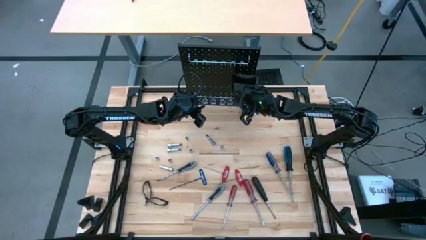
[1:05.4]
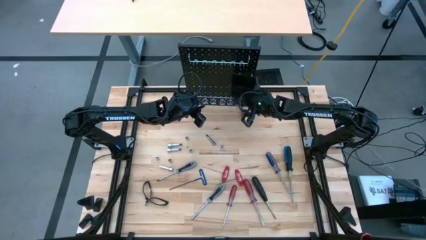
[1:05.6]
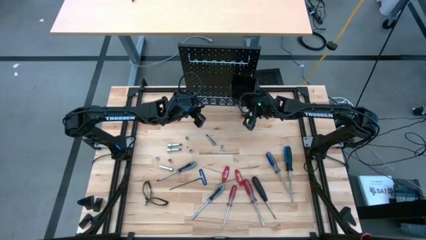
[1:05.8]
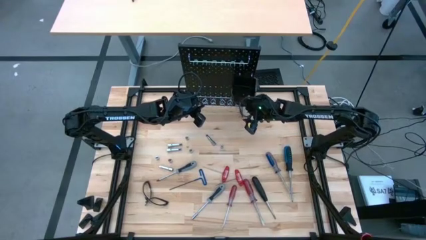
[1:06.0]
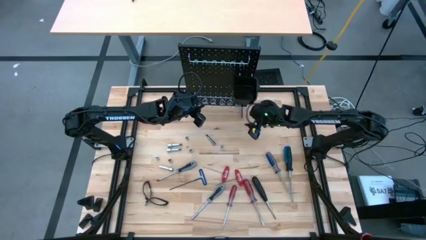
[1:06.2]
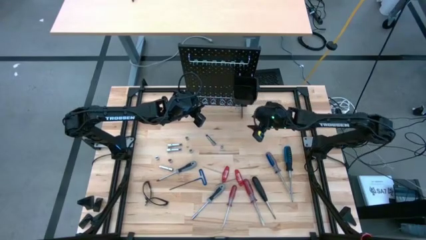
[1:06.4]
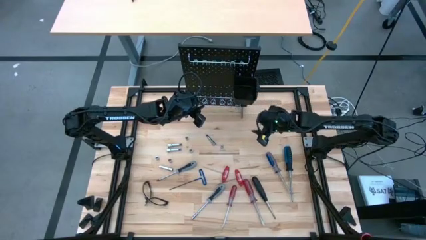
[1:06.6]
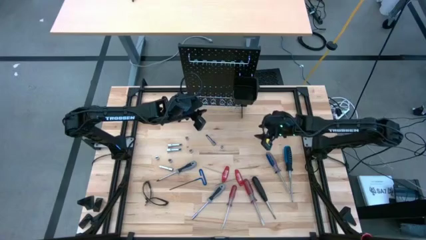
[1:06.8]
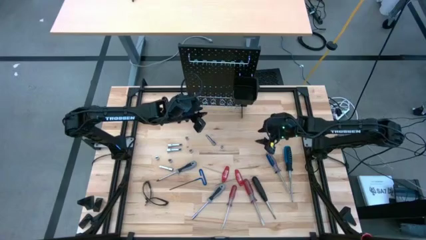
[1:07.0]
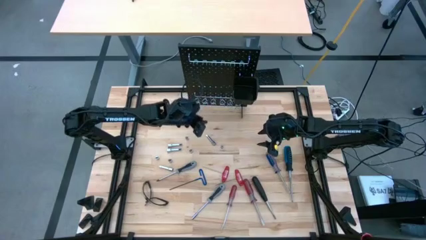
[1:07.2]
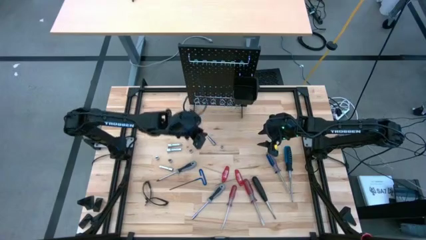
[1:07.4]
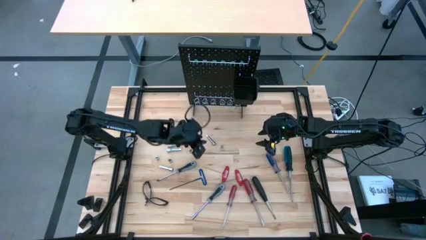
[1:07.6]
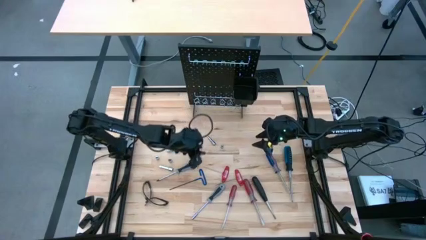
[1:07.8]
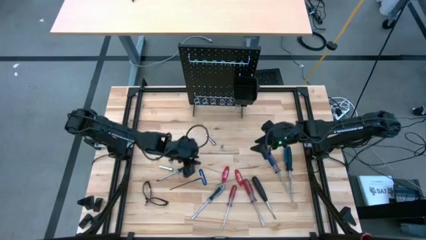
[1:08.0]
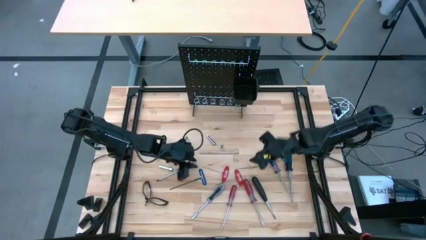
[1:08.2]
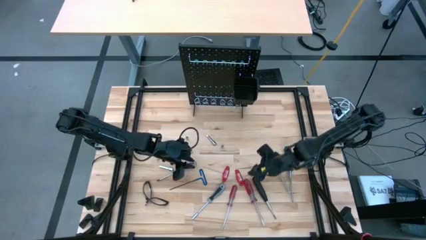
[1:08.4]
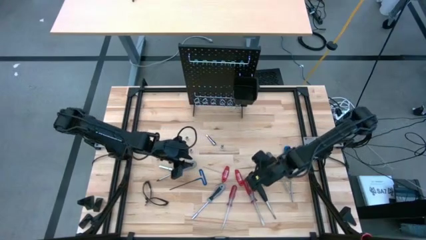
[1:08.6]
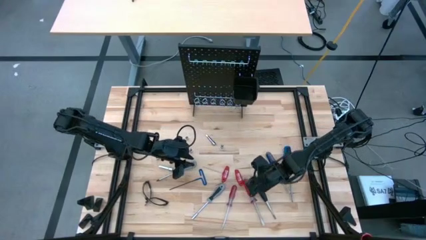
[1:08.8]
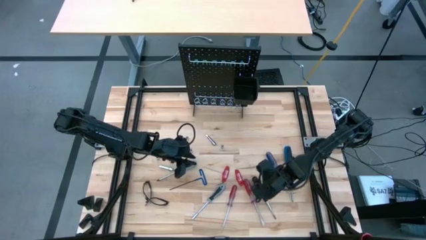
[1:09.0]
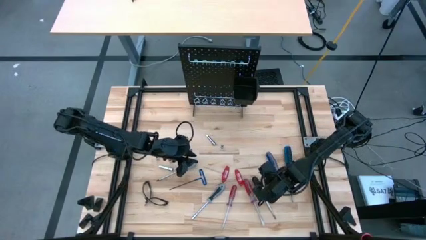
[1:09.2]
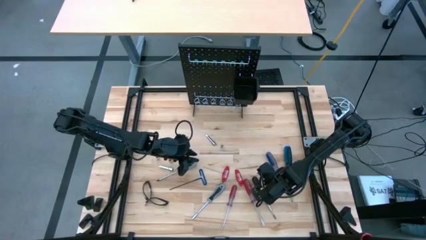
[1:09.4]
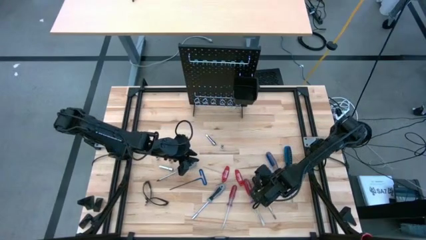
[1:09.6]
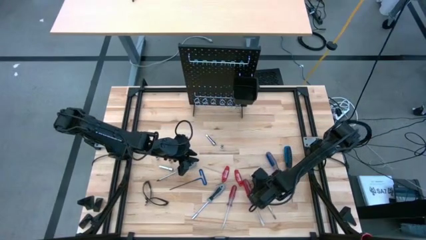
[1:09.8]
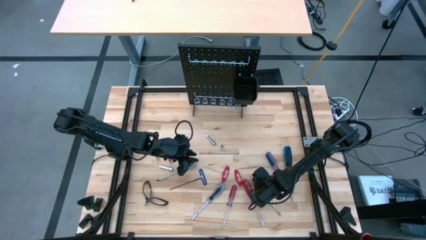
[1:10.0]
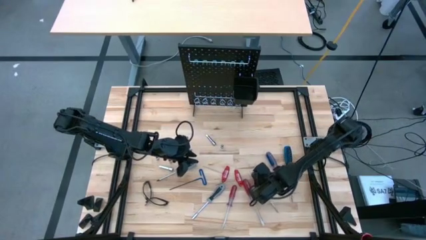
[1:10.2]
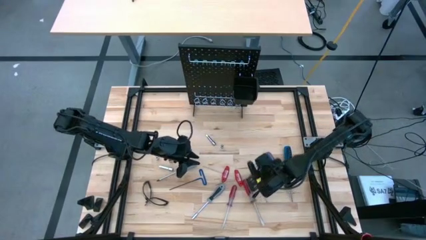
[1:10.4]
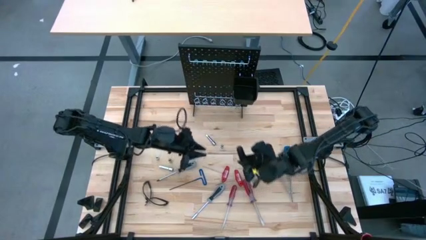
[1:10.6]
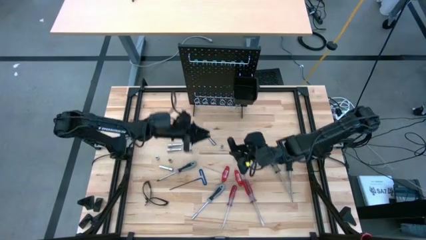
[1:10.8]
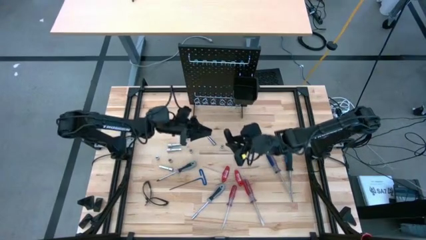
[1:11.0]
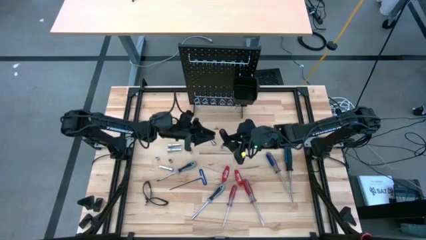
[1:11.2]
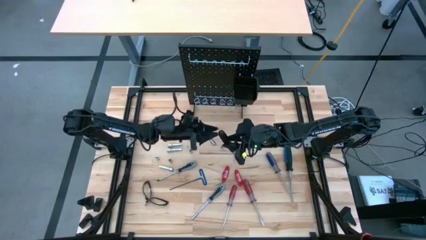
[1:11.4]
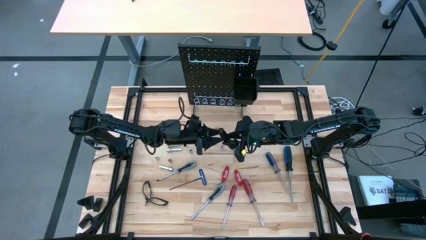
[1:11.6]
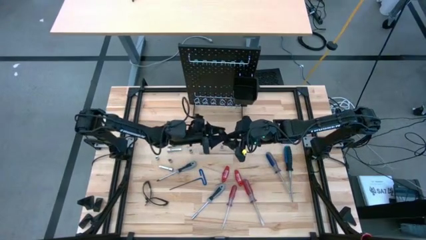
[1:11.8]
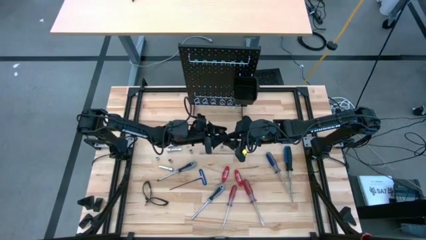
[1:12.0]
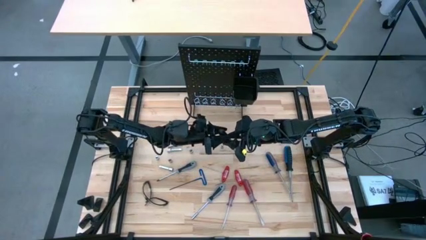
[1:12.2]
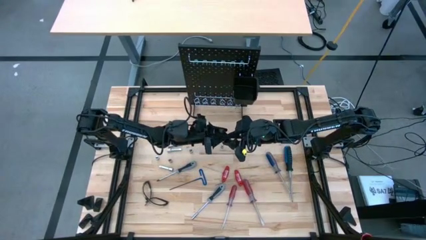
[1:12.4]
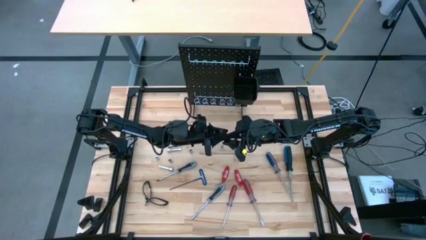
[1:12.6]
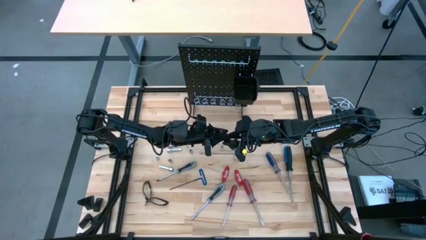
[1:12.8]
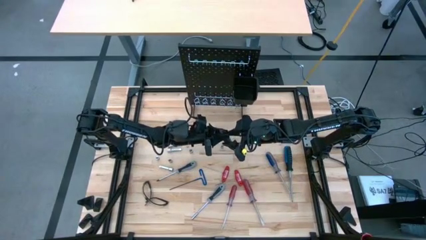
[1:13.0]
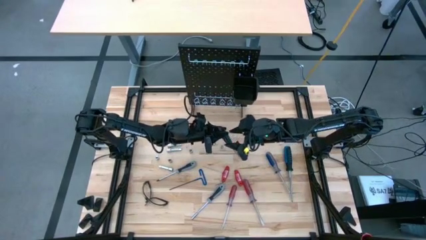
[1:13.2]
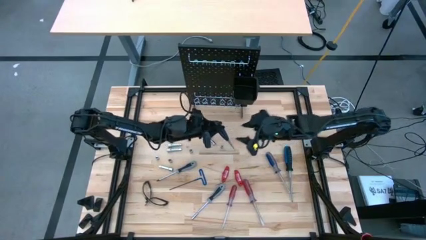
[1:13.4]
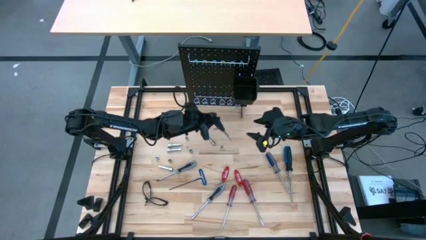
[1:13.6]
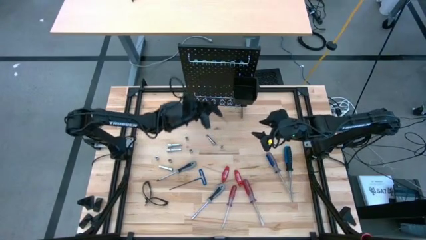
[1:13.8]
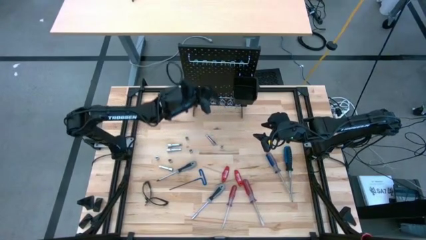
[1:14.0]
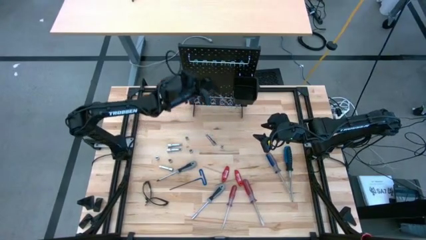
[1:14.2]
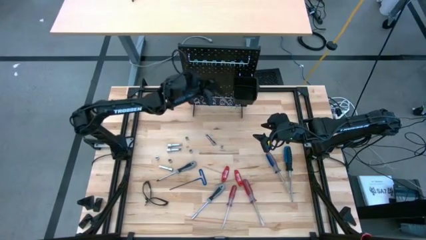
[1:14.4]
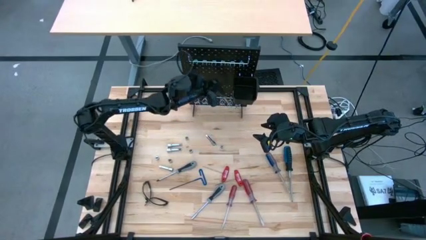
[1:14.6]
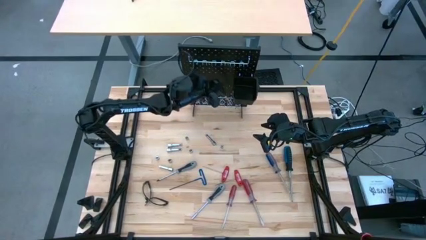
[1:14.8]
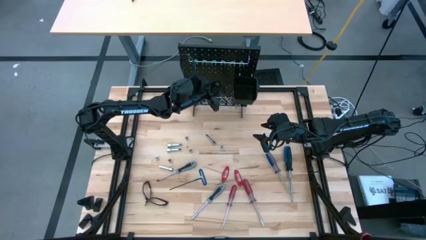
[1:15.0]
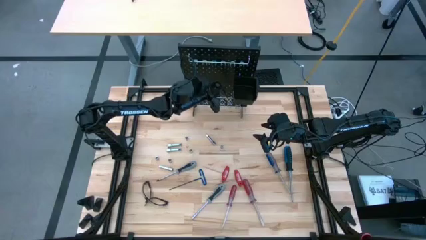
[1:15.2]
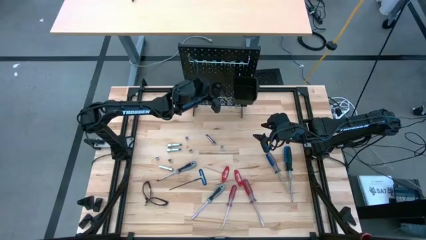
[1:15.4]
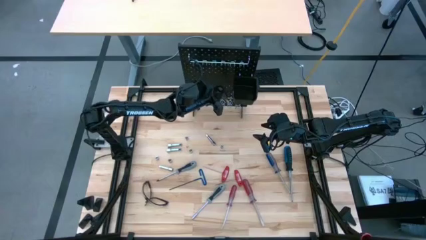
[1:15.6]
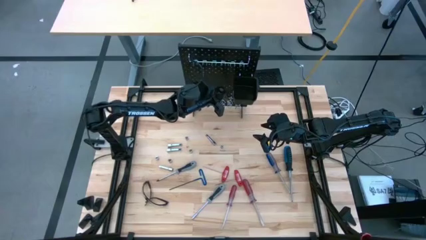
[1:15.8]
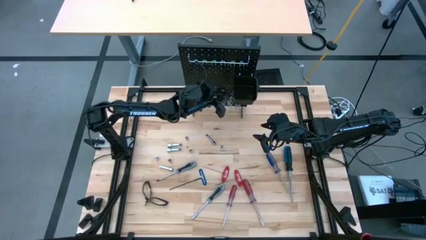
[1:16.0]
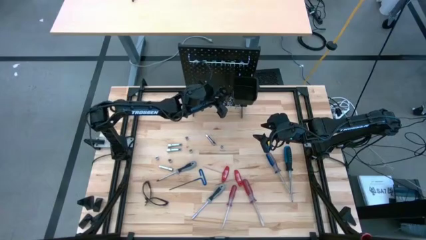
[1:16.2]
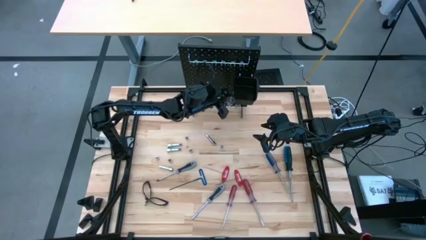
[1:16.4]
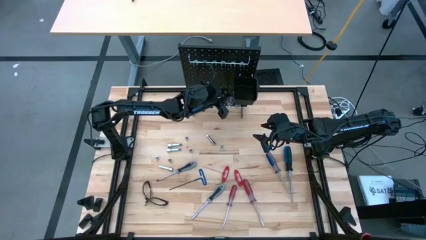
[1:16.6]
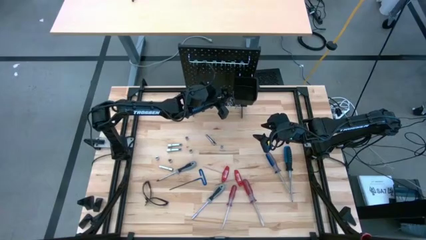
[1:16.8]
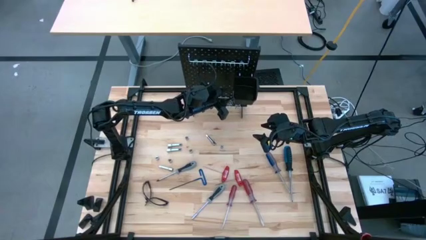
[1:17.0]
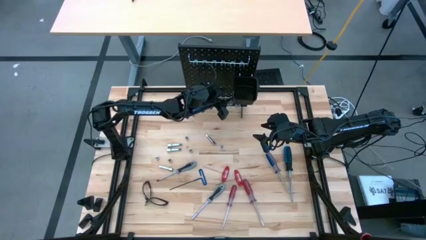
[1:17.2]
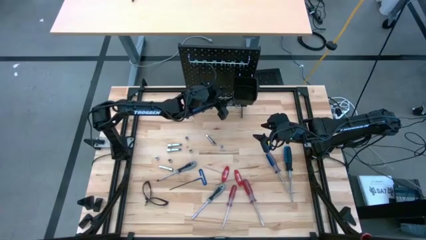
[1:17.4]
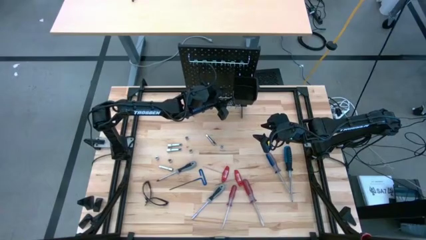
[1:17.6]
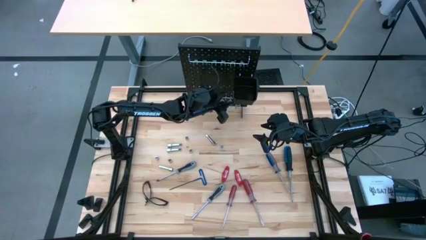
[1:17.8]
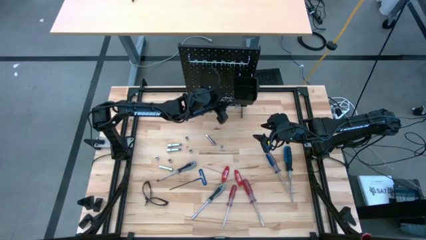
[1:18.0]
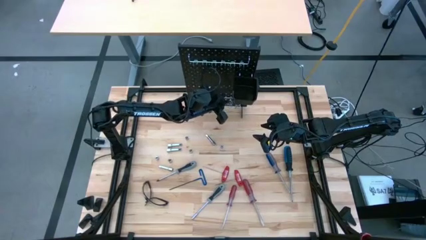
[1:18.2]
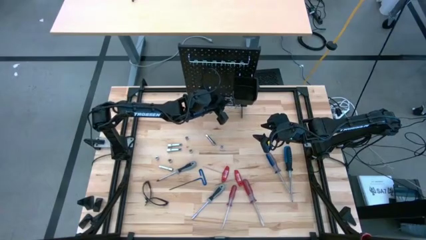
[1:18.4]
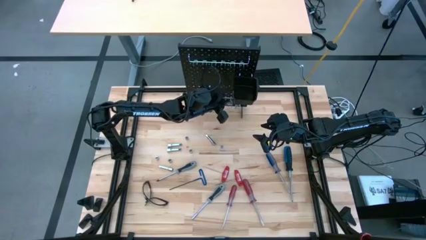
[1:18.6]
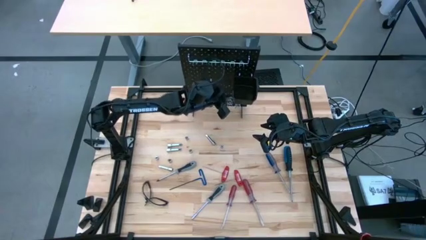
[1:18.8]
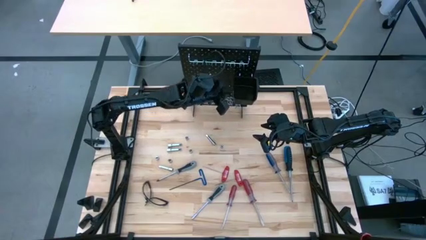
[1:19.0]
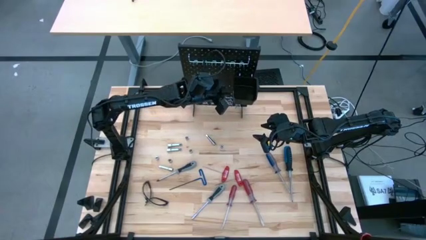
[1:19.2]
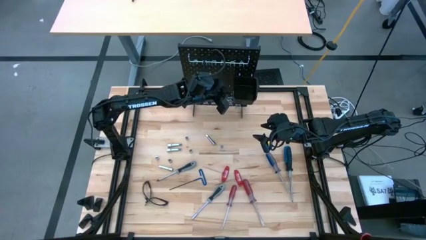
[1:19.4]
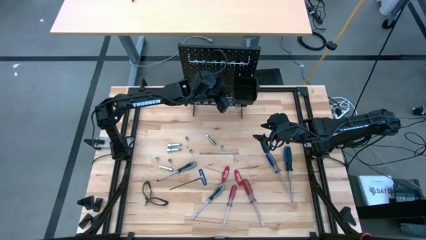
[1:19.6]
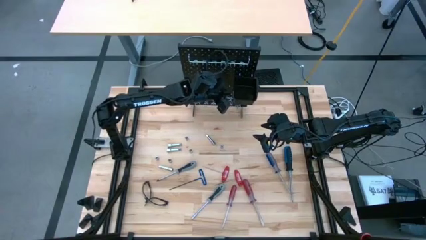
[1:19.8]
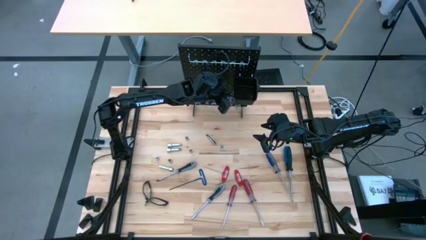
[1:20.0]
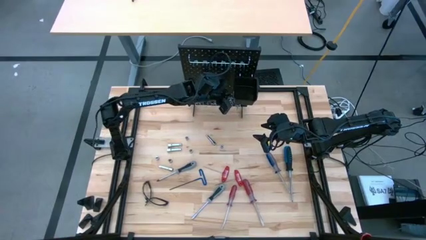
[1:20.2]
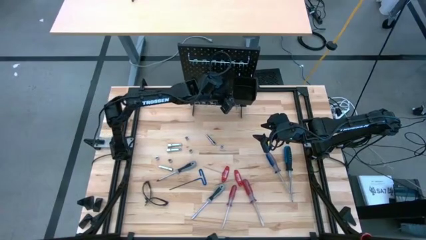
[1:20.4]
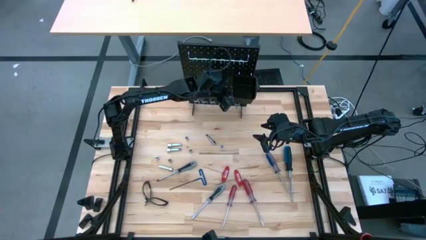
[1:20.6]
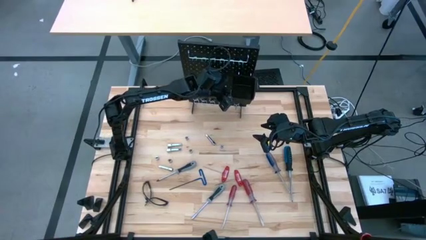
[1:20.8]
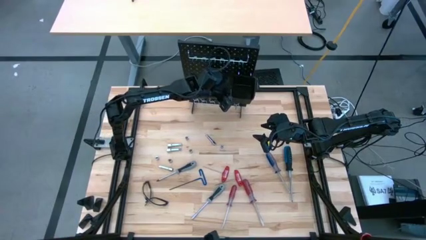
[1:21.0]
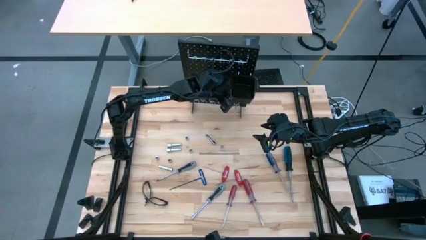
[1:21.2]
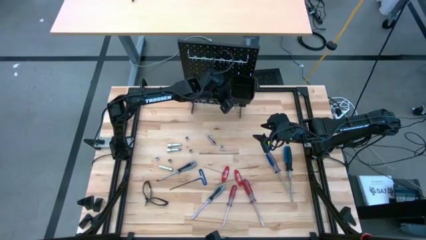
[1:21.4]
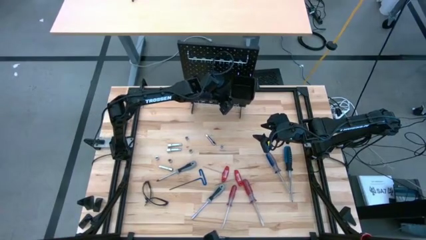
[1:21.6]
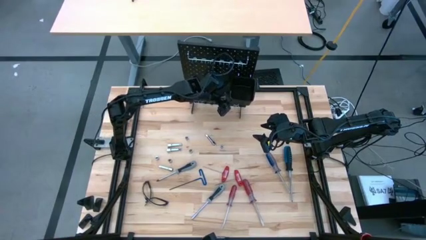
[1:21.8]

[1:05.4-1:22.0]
Task: Hang tools onto peg board
Hang the black screwdriver on the pegboard
